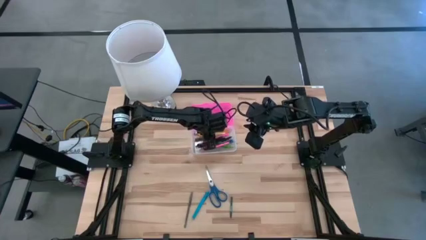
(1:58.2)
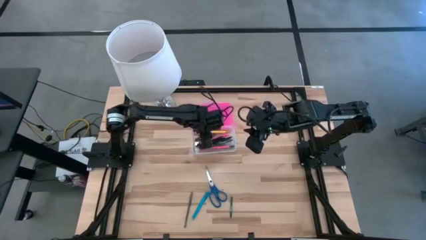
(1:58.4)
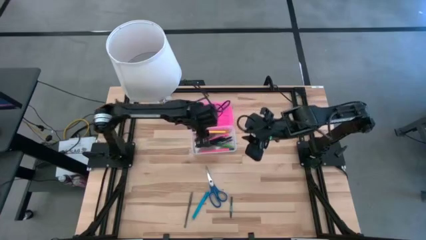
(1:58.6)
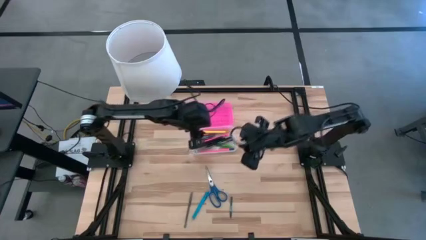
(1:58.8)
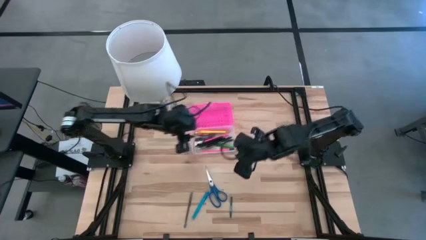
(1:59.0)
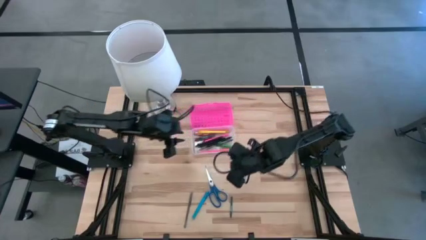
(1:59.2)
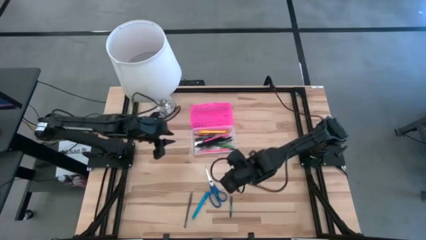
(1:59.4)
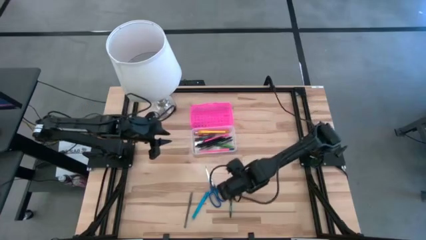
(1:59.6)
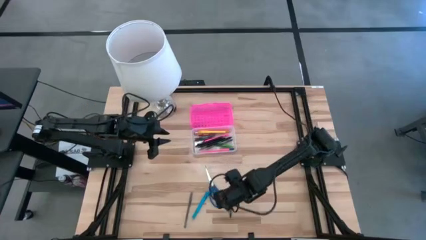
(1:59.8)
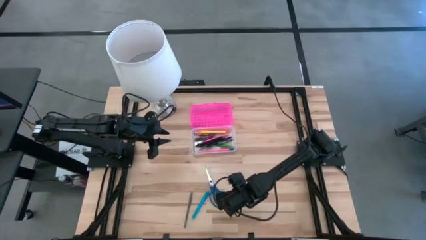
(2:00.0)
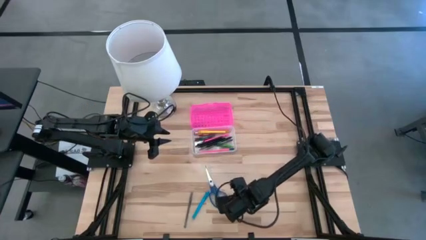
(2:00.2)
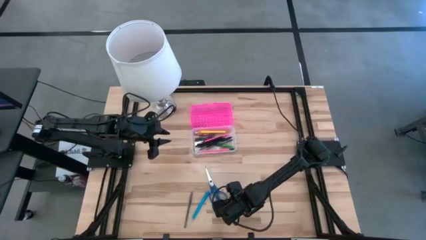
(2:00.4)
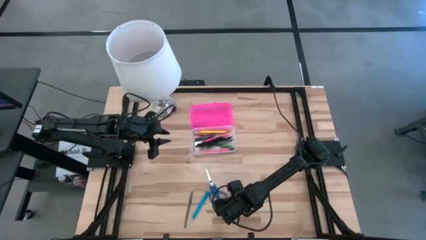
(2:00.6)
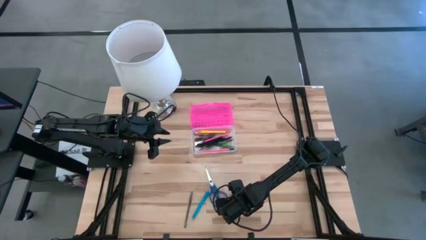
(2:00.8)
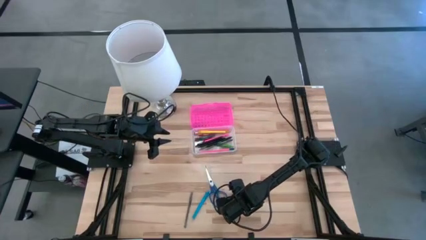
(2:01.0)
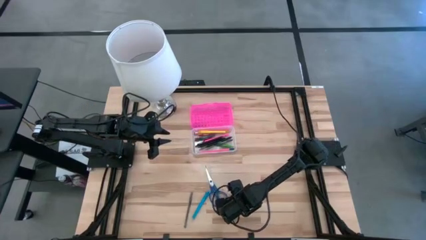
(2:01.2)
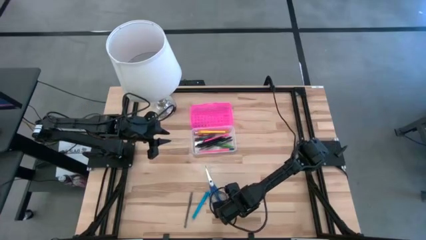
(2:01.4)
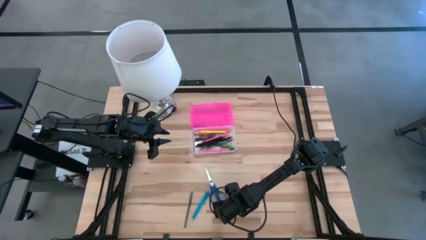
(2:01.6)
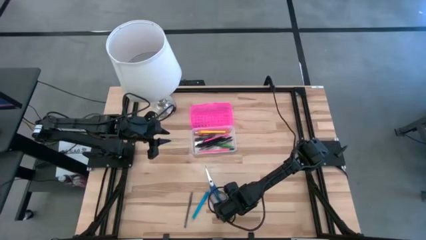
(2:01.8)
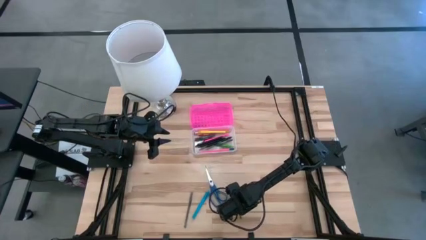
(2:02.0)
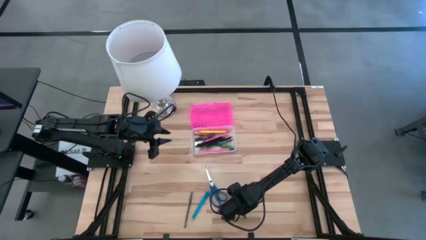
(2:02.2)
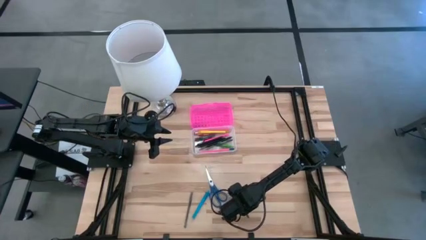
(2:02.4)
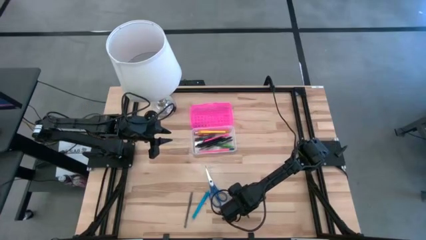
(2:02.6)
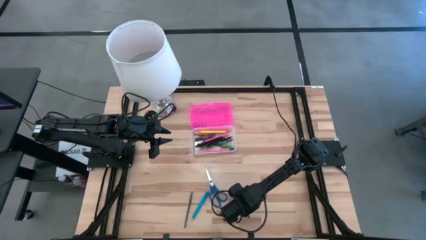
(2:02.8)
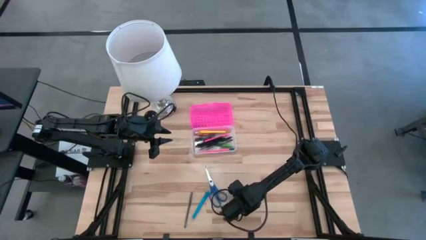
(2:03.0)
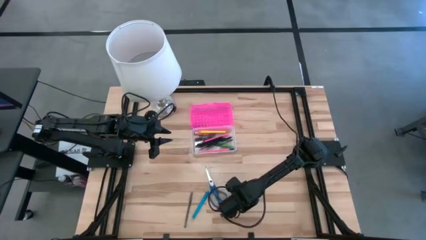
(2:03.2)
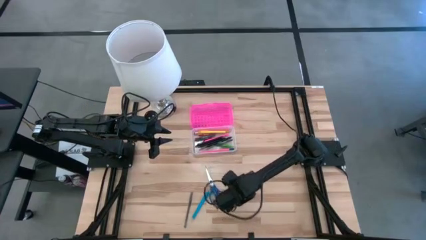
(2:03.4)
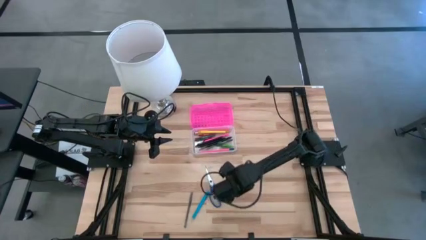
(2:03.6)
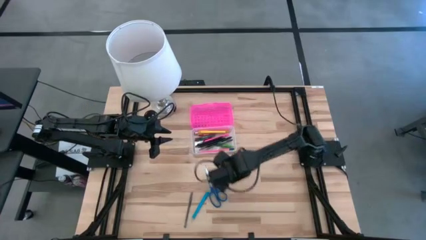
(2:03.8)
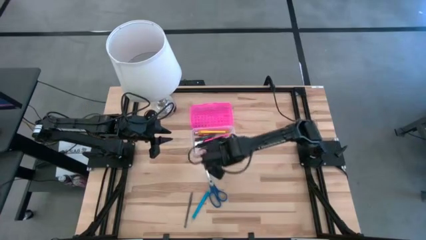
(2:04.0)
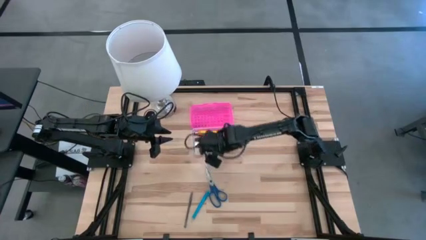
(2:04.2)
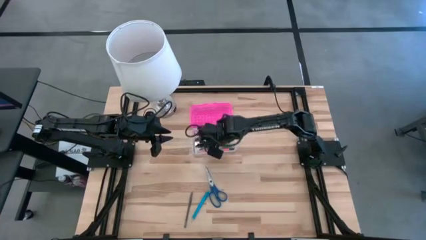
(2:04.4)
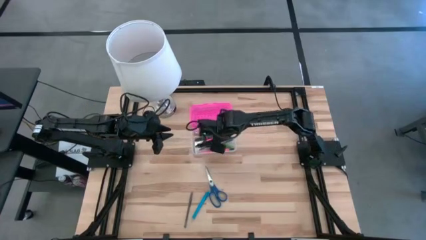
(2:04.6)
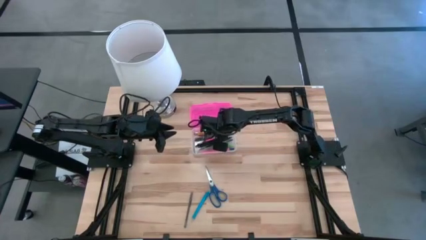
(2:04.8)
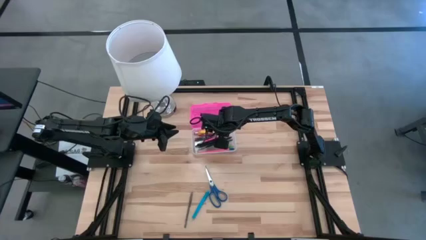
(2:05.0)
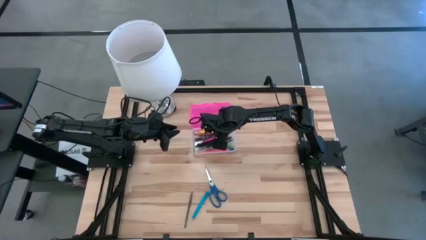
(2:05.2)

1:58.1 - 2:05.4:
Task: Pick & place school supplies into a supply box
Put the green crayon into the supply box

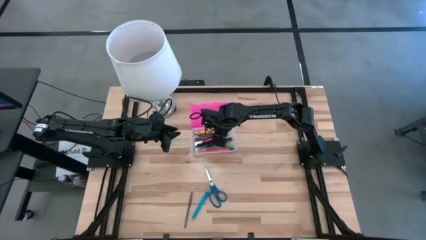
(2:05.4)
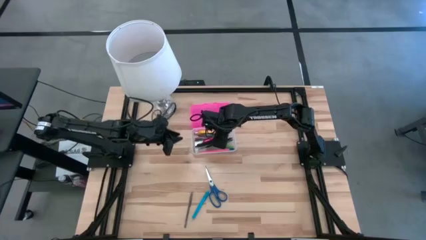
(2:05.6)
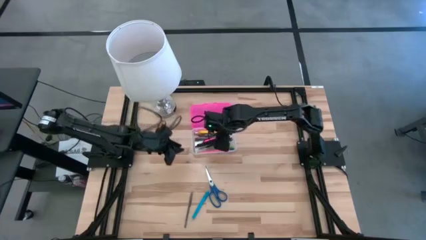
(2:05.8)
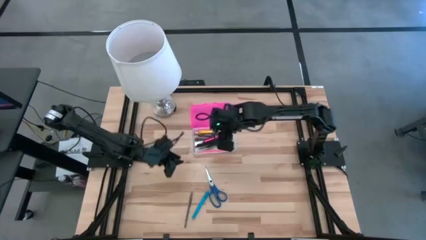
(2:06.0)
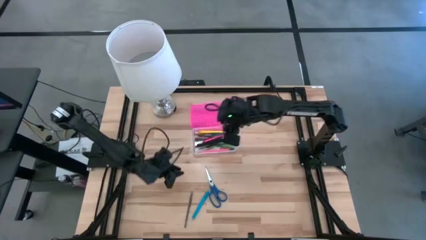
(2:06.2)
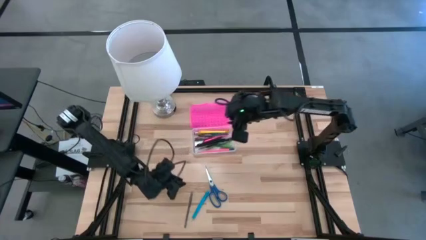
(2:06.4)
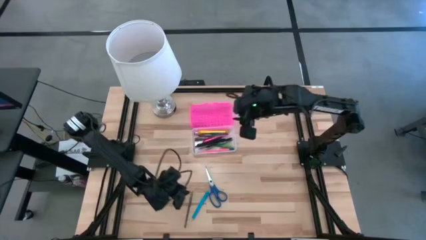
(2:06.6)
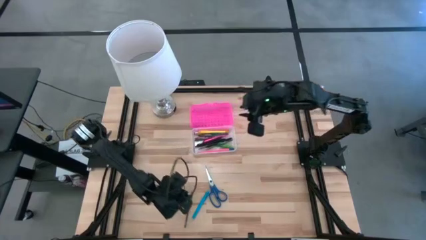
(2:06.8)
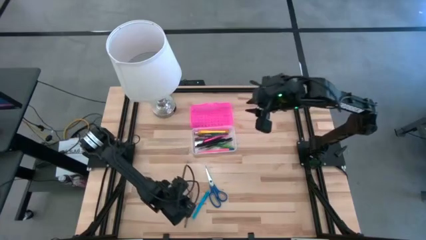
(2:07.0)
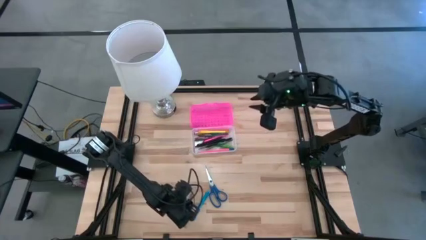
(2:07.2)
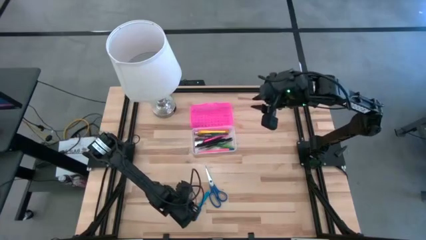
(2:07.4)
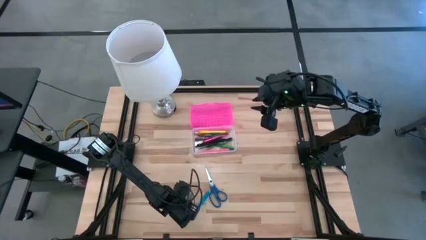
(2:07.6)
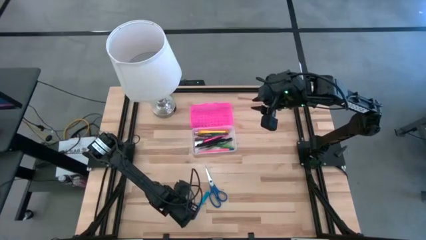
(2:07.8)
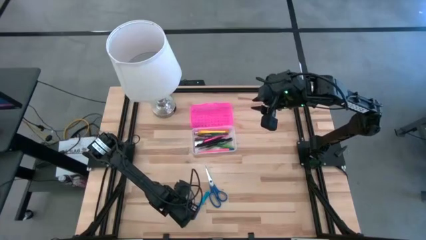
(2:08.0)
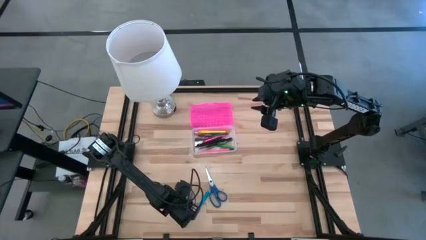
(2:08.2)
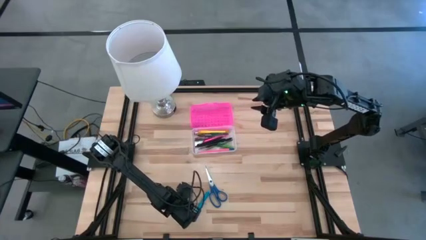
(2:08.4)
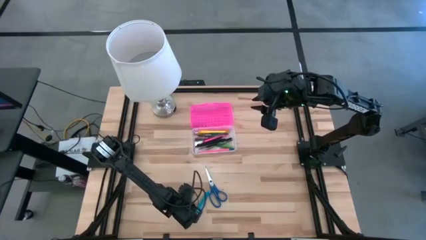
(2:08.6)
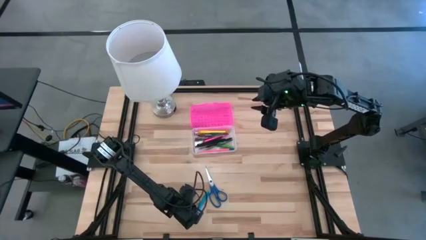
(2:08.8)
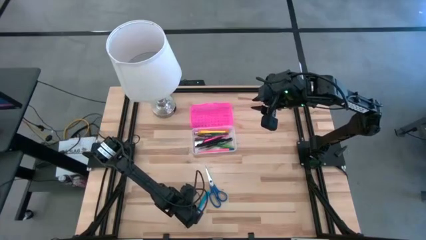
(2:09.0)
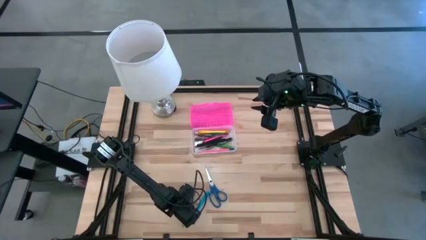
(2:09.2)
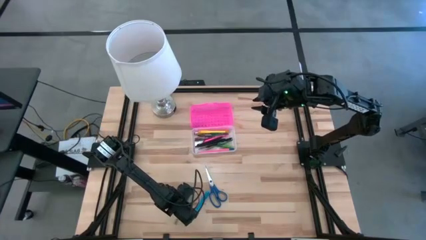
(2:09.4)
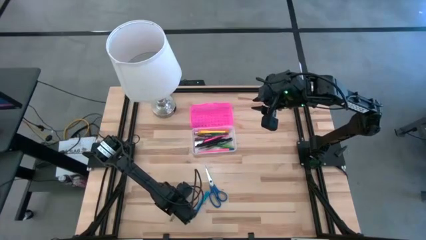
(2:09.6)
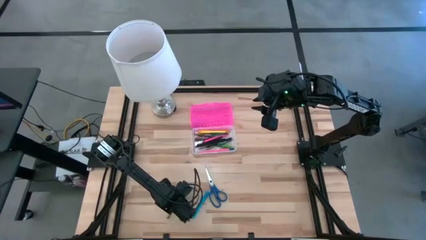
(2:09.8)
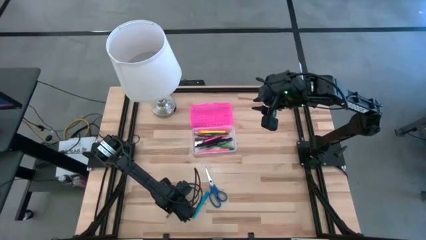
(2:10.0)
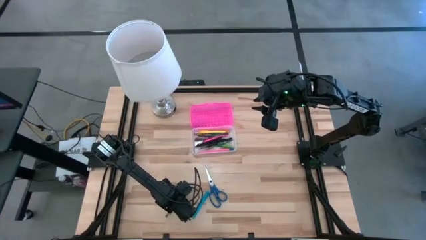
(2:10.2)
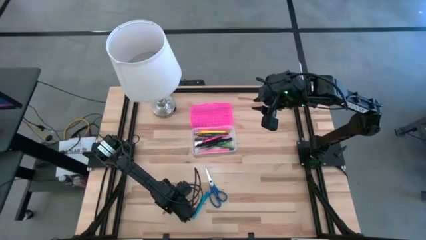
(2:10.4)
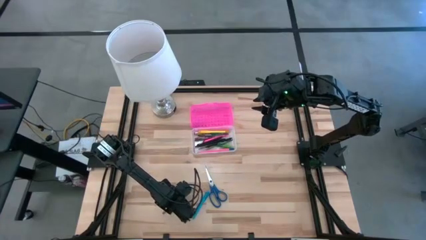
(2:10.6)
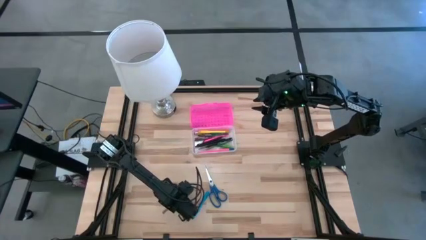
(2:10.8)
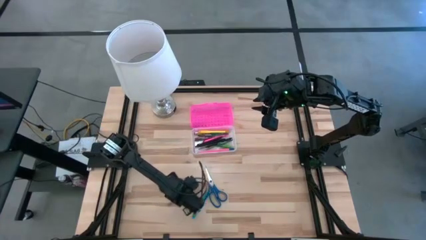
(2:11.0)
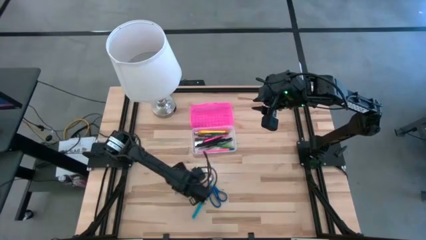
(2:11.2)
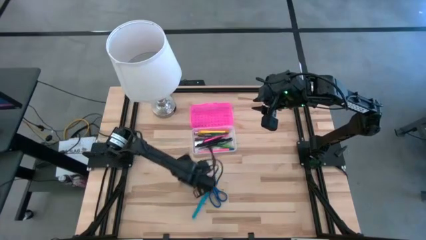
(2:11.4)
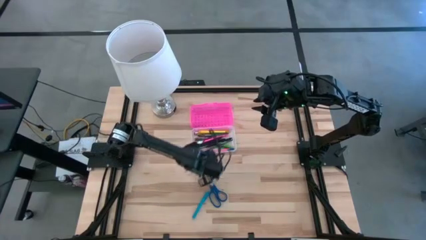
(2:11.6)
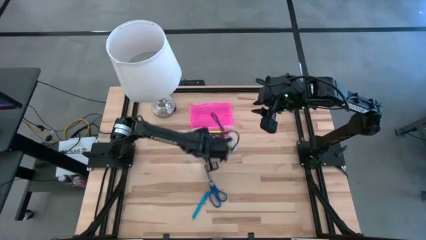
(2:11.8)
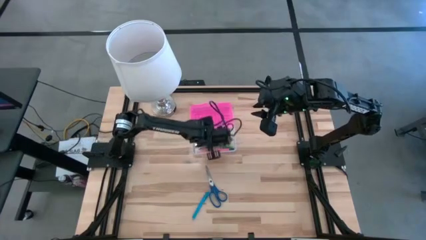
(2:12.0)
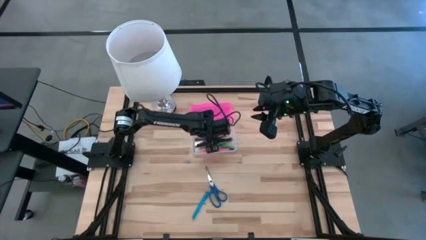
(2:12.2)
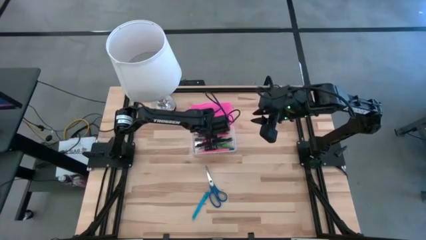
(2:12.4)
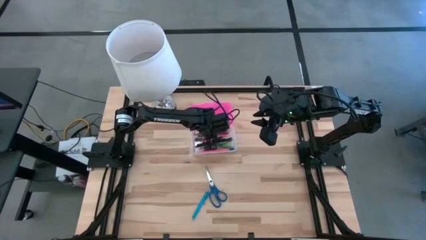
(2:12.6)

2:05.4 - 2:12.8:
Put the transparent black pen into the supply box

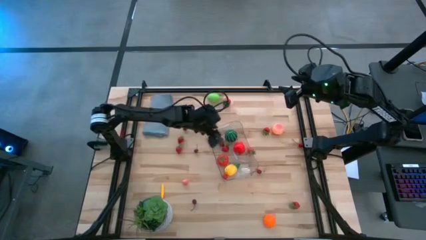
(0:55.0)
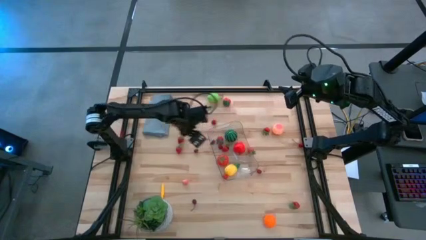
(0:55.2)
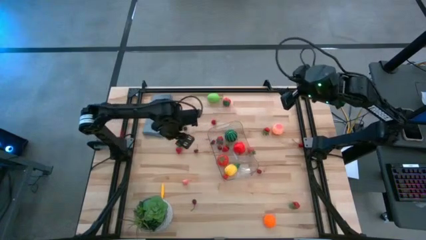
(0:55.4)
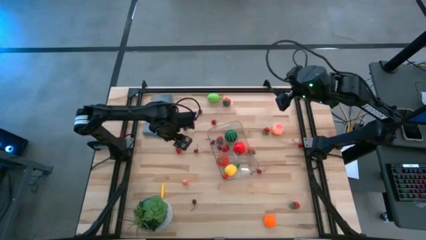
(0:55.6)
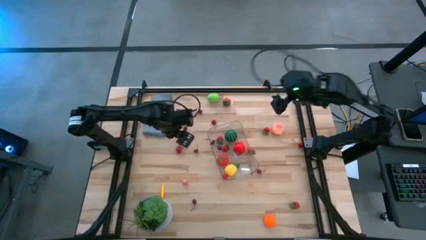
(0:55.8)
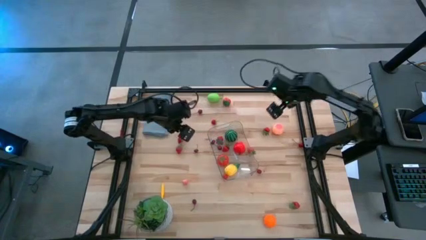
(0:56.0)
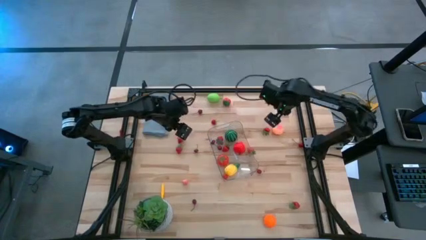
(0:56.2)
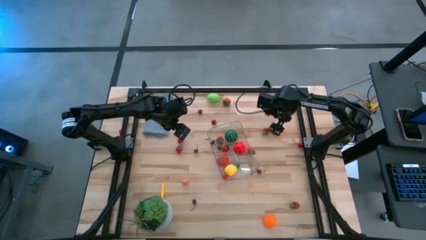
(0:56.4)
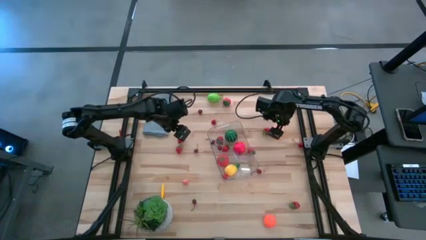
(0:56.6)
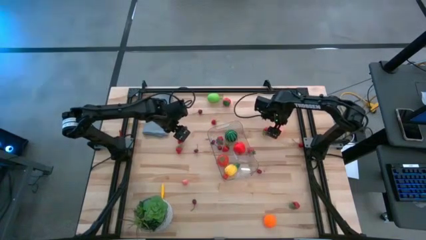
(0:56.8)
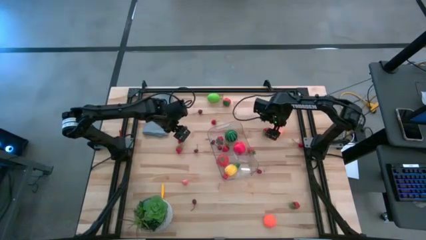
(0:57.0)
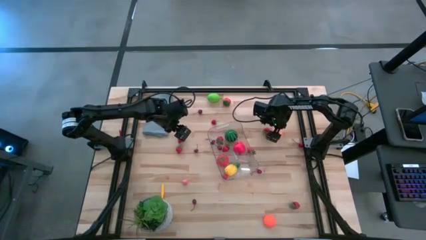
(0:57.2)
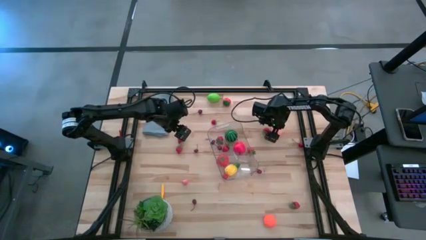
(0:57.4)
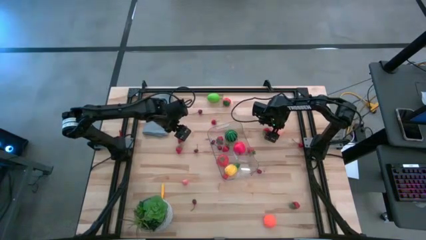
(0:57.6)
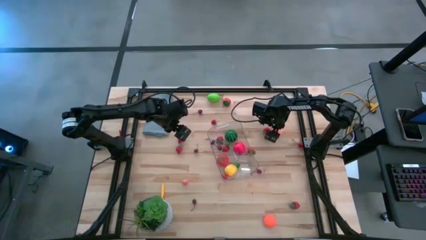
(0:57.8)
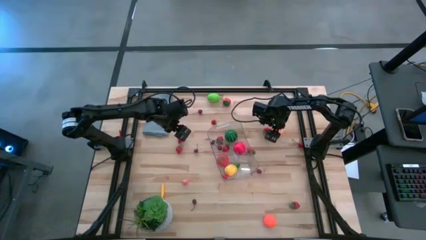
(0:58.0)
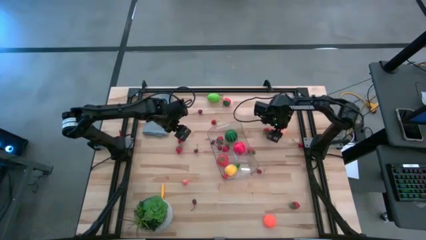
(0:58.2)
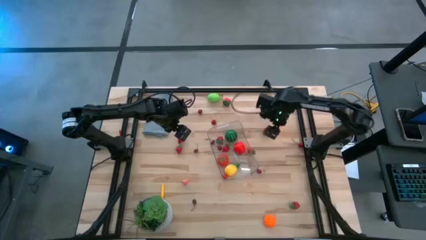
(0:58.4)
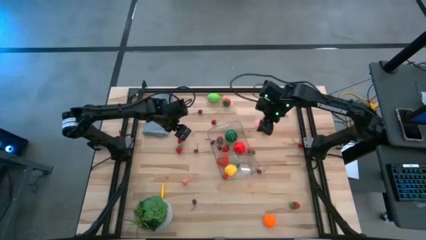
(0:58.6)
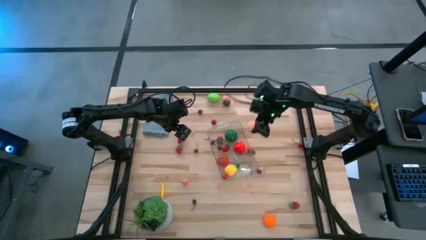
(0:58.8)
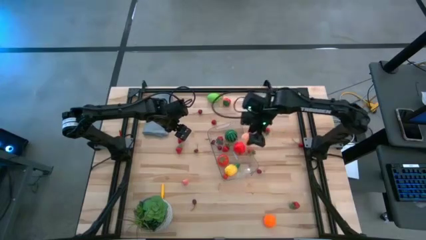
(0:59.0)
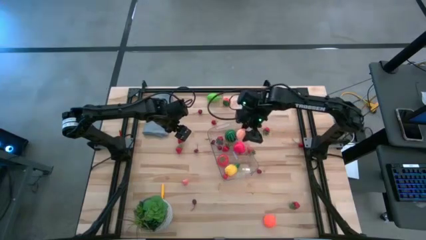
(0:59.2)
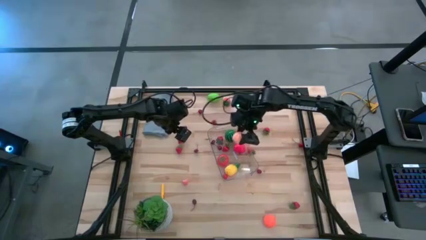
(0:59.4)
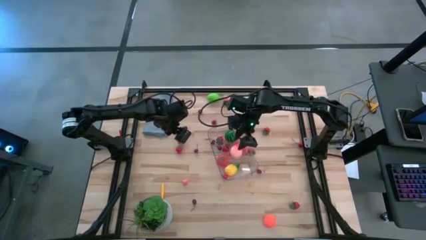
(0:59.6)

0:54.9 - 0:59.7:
Task: Pick and placing Produce into tupperware
Put the big pink peach into the transparent bin
